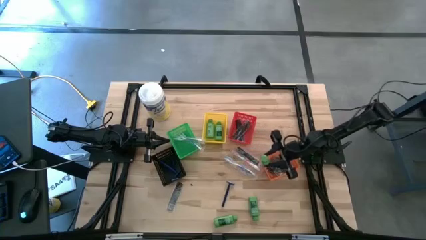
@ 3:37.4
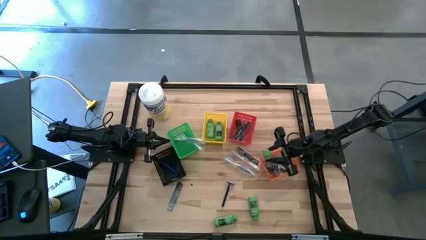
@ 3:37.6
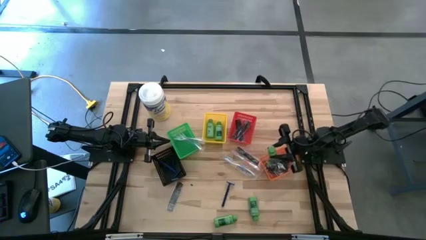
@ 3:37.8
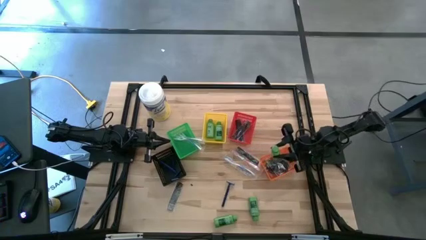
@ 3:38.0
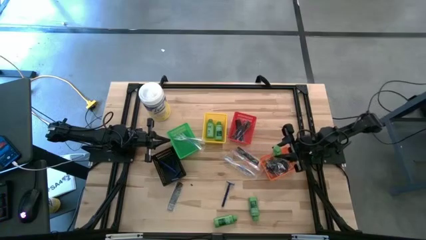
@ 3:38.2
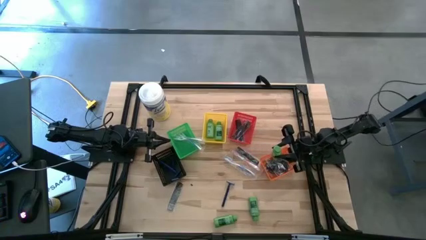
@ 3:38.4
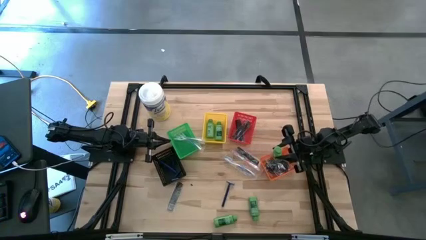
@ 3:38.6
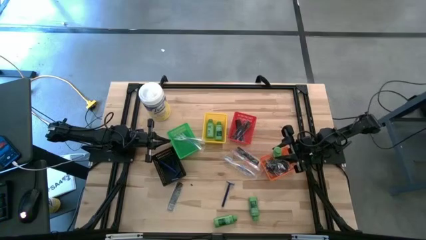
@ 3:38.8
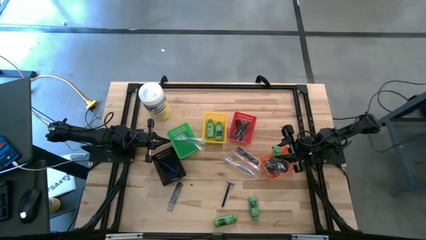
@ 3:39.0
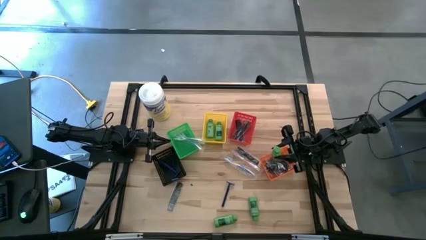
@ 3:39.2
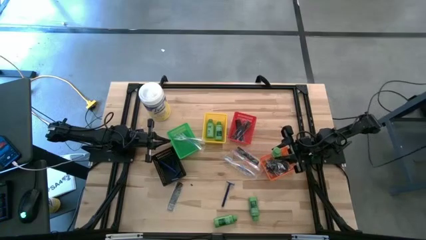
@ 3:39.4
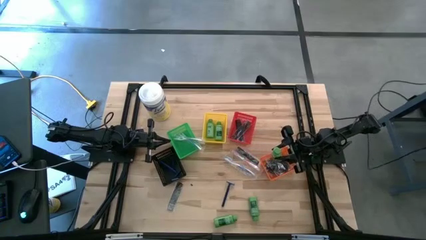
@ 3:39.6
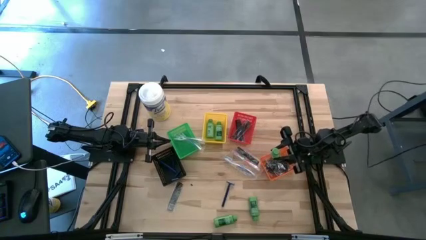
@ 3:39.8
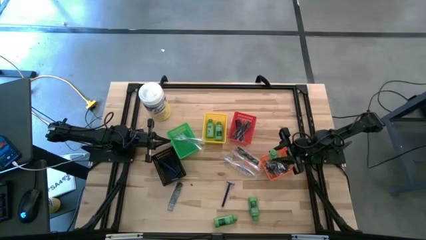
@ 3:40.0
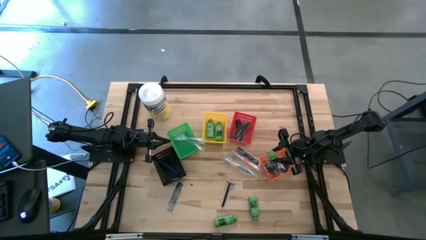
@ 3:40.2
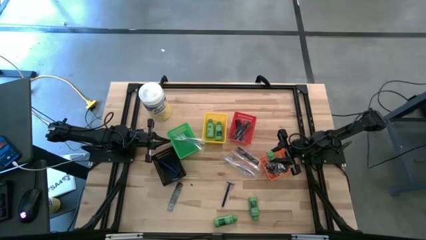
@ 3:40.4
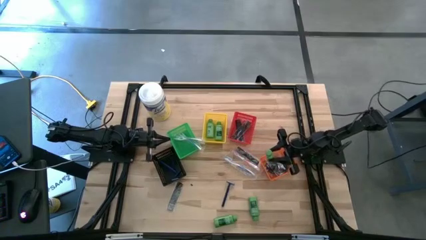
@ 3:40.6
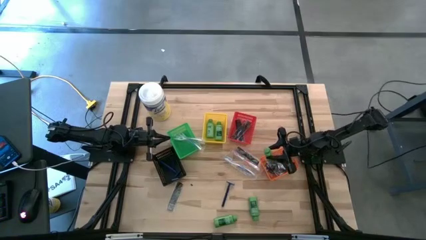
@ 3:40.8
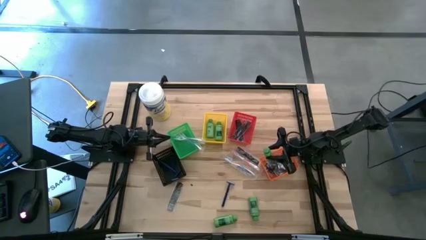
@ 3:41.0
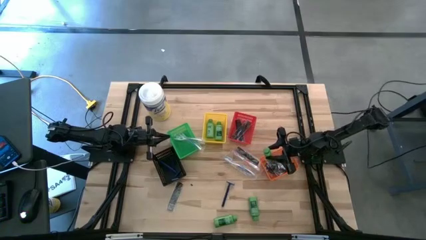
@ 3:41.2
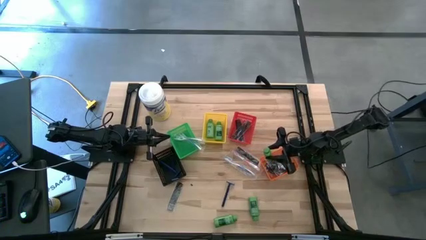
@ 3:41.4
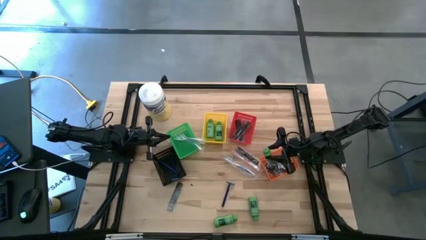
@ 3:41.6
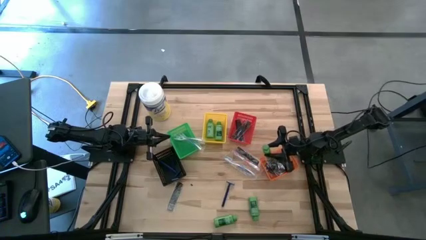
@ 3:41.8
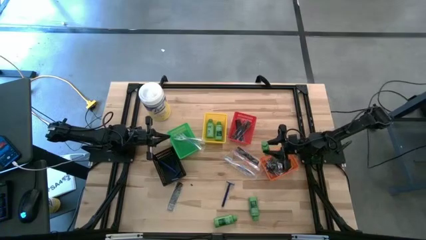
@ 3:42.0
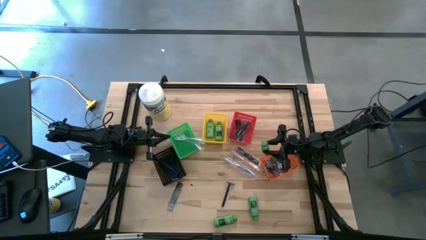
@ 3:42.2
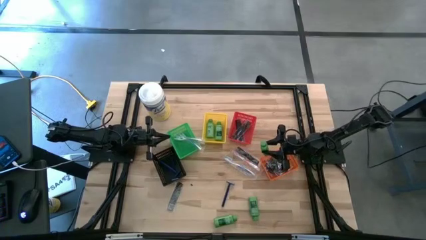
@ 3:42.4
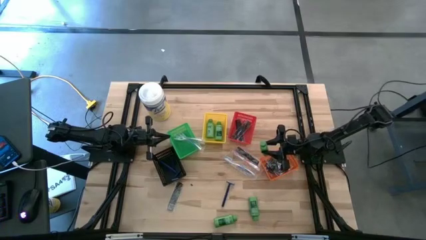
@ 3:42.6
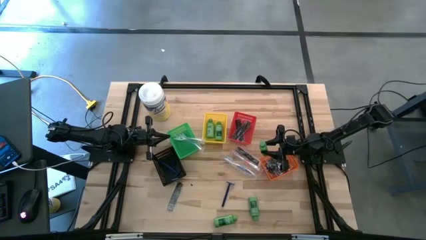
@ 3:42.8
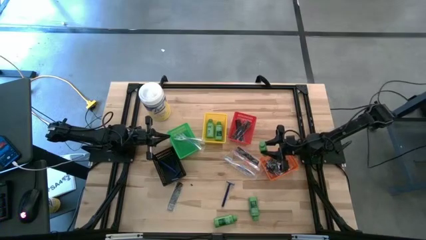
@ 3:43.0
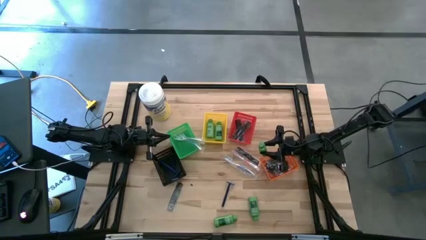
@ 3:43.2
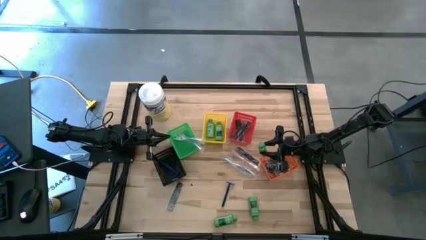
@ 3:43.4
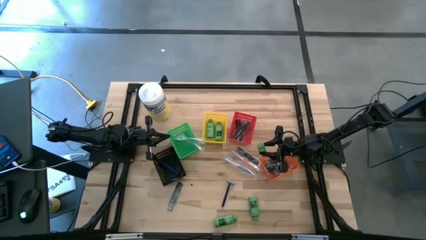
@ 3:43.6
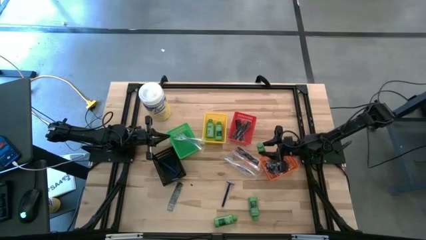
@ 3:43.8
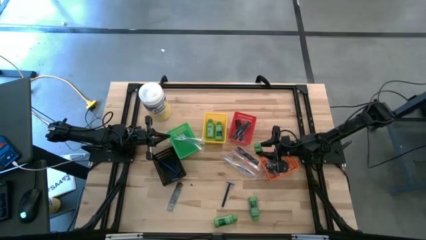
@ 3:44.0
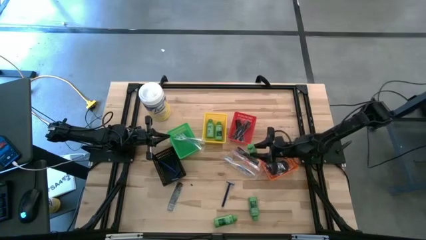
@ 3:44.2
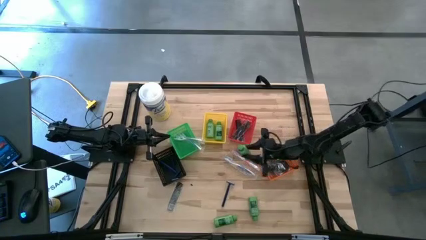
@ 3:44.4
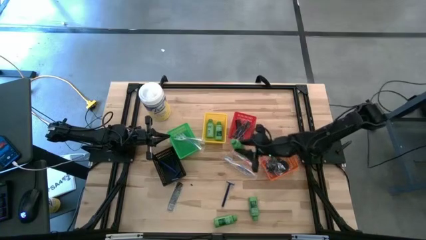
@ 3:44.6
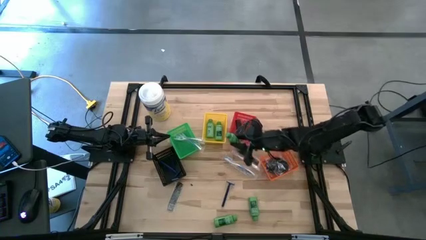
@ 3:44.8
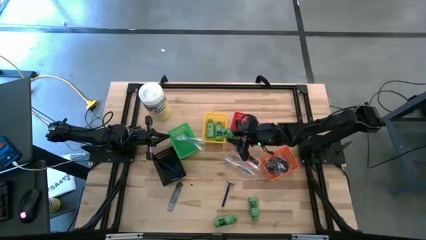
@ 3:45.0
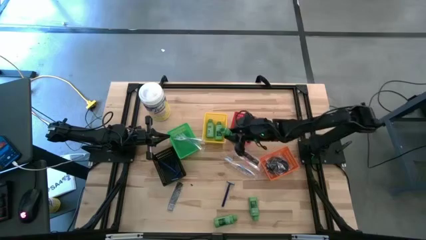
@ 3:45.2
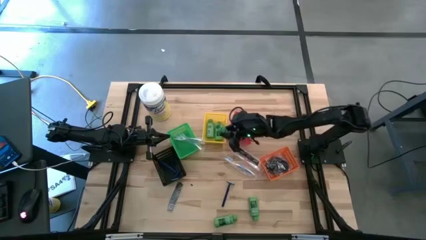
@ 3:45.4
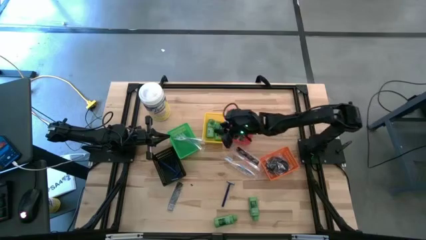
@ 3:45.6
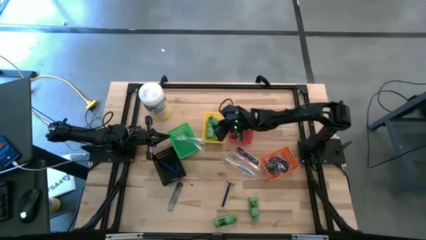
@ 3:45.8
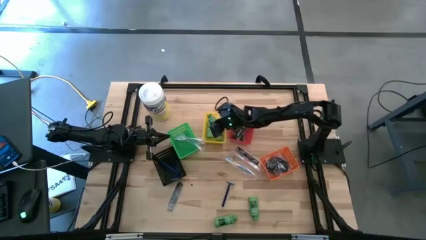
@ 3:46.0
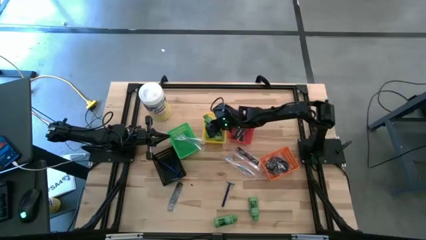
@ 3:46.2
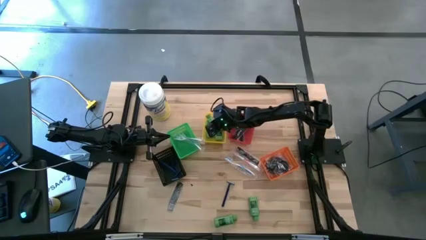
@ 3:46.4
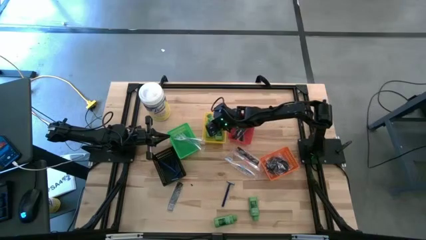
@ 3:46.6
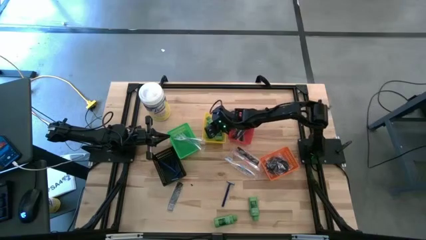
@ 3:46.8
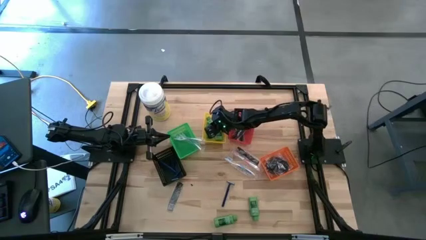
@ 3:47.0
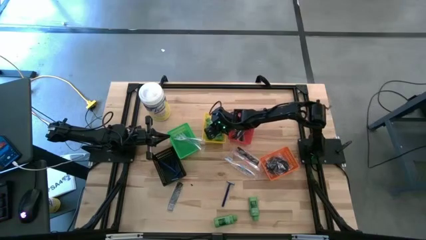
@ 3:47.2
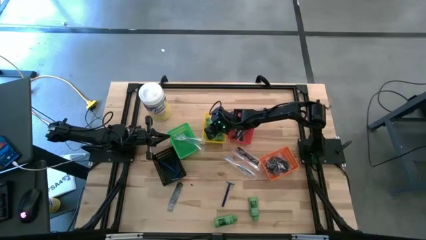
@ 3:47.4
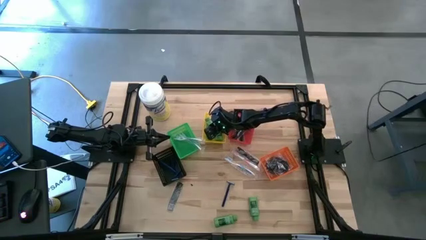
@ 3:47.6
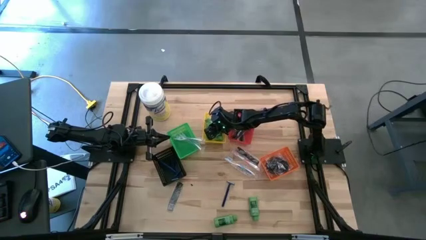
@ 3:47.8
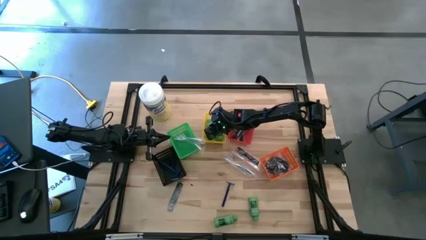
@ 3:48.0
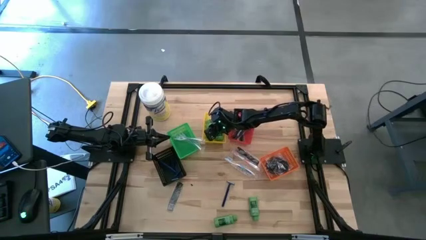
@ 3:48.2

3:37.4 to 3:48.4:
Task: Pick & Place Travel size toiletries
Put the green shampoo into the yellow bin

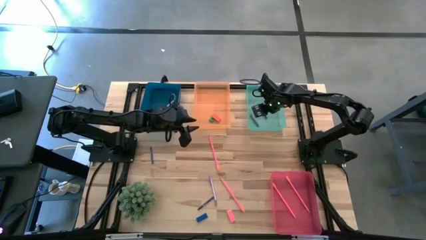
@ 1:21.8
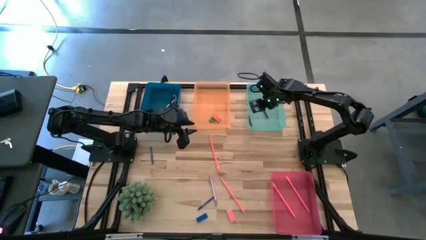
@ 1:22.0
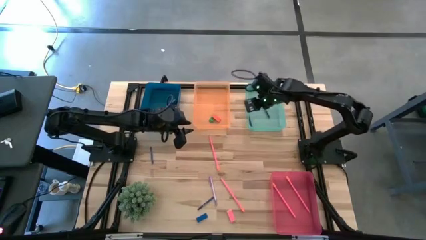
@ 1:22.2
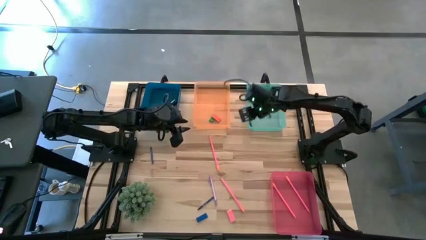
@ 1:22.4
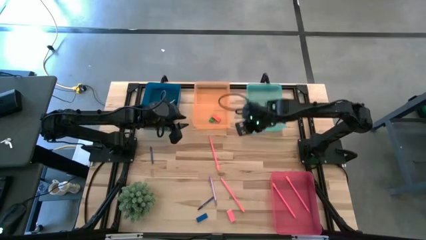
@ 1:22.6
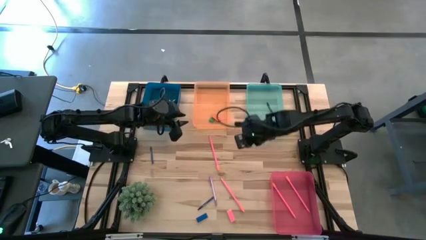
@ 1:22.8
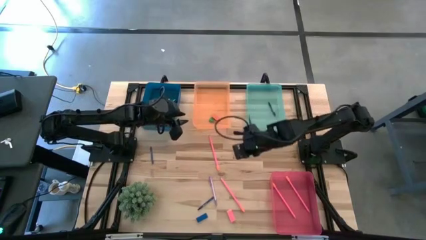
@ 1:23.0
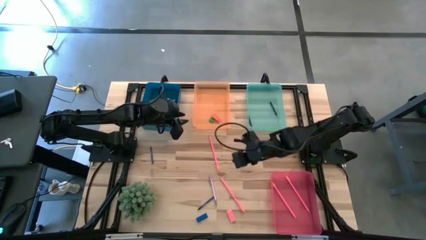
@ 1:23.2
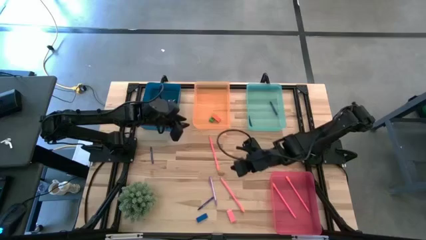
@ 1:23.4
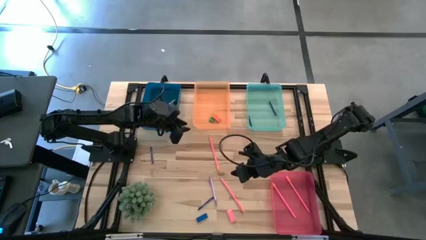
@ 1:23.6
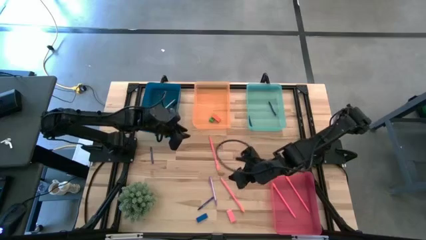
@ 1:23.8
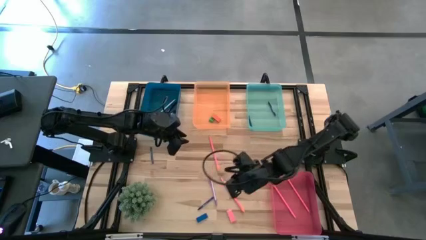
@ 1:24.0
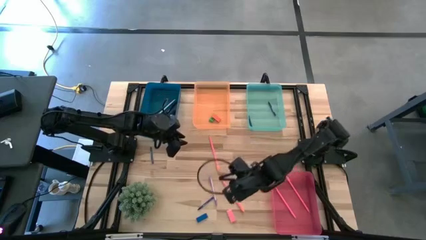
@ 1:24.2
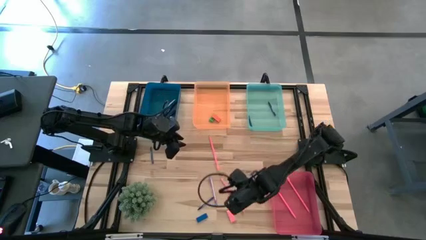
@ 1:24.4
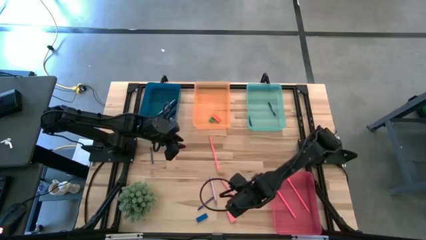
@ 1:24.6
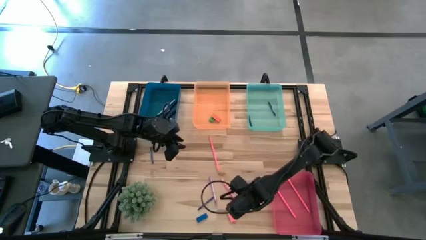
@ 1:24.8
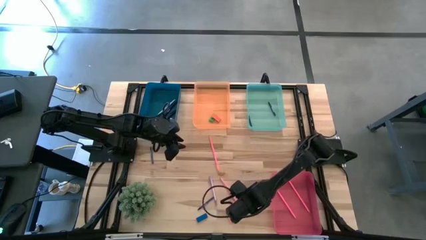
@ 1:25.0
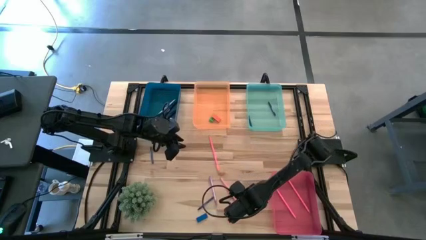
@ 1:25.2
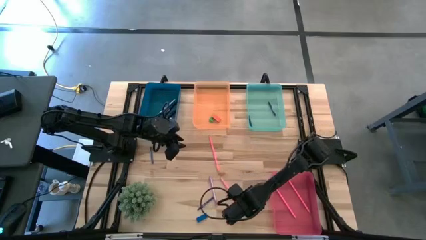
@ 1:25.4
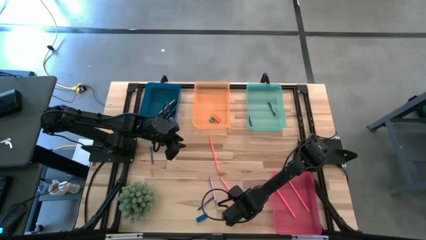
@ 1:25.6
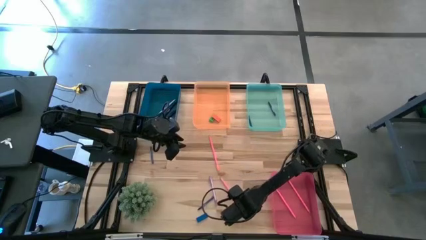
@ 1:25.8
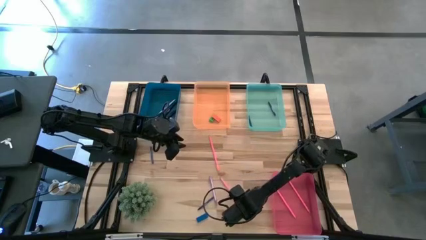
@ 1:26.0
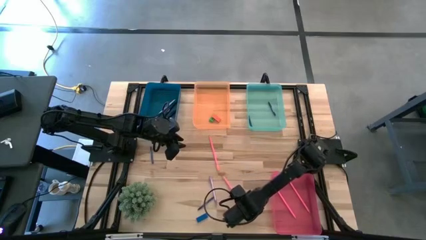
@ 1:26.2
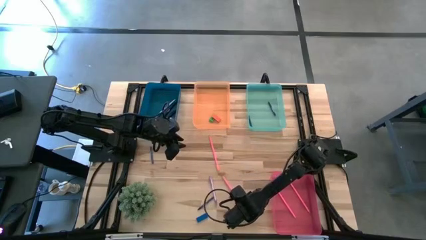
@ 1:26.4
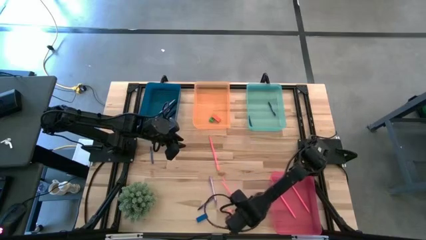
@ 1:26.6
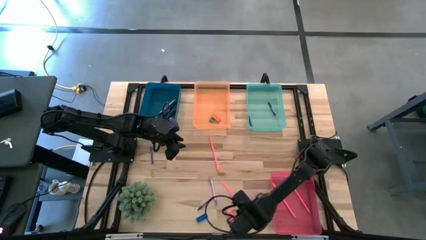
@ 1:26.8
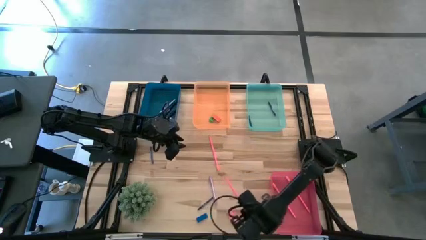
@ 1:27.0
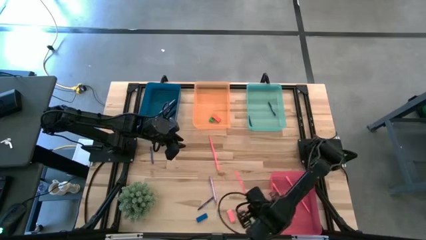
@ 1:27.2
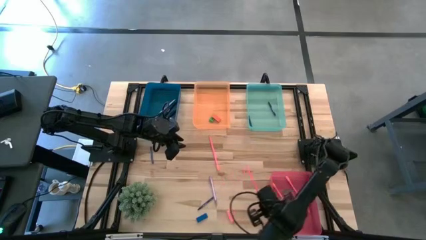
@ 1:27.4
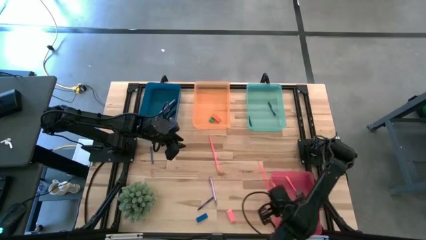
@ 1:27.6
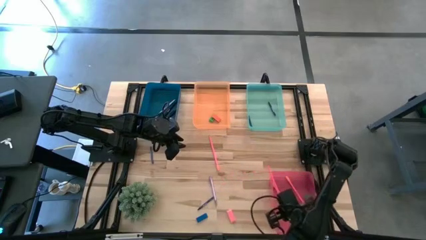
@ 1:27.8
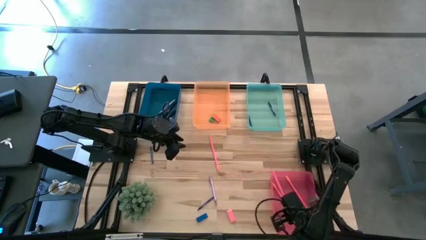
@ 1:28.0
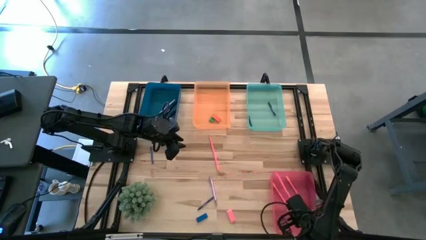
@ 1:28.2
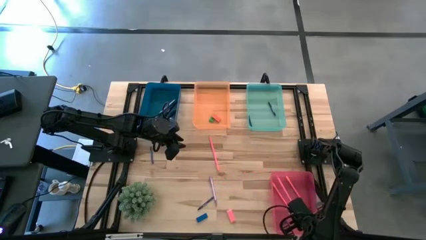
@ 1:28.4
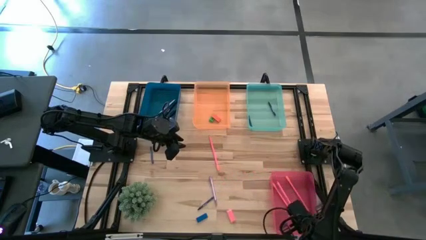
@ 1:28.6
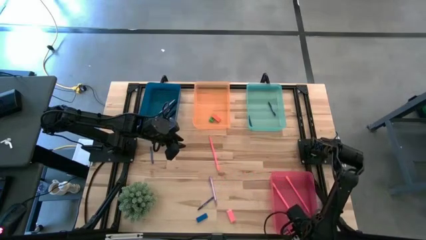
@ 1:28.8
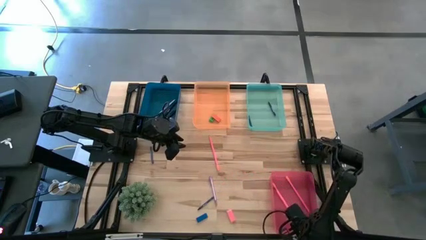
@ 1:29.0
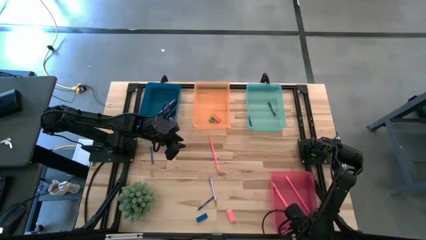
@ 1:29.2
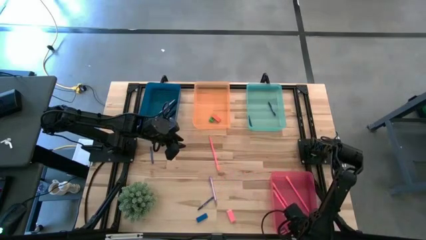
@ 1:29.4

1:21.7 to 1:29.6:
Task: Sort crayons/erasers/pens/pencils in bins
Put the pink colored pencil into the pink bin
